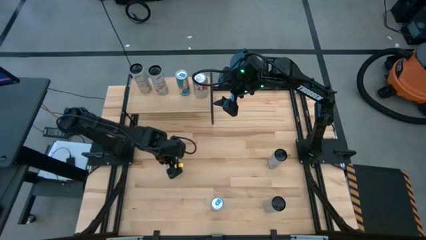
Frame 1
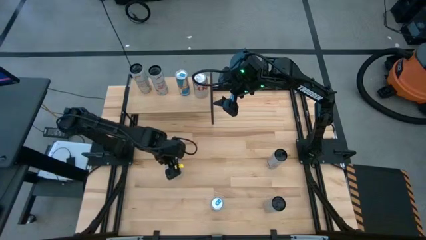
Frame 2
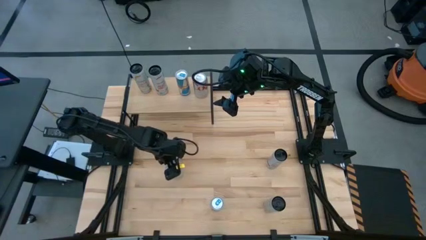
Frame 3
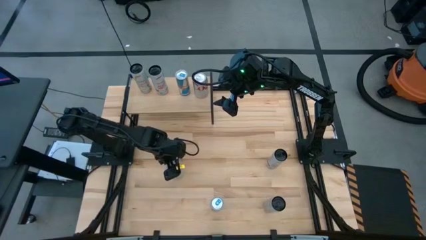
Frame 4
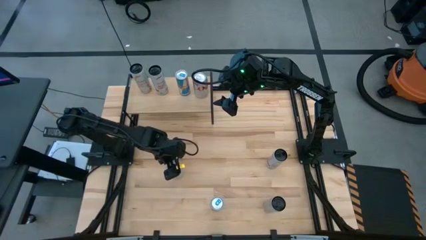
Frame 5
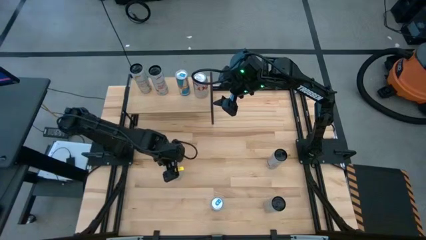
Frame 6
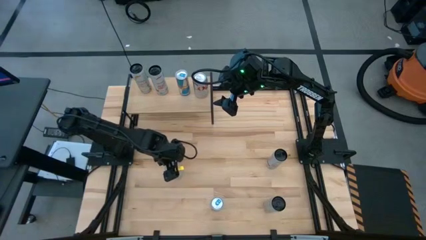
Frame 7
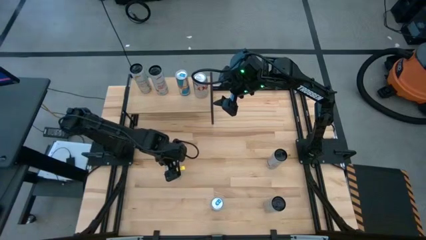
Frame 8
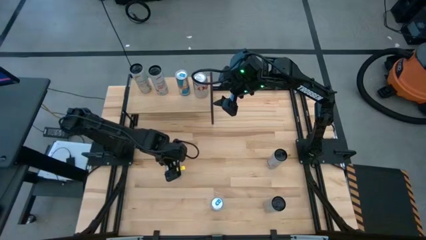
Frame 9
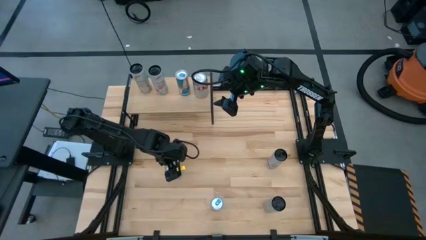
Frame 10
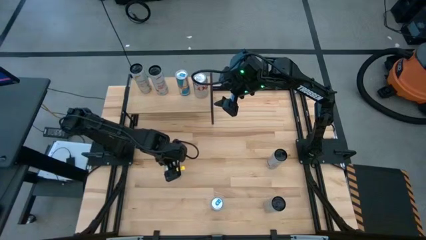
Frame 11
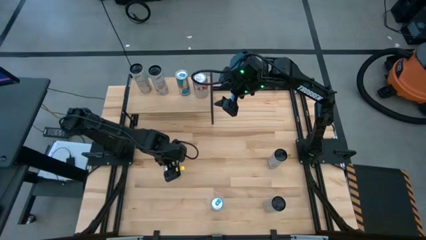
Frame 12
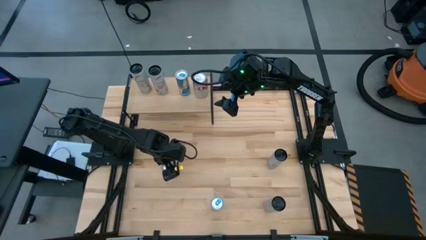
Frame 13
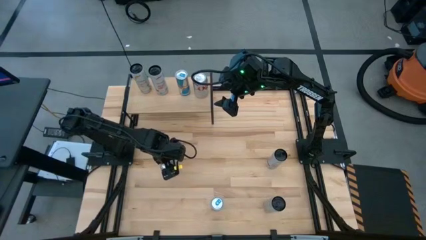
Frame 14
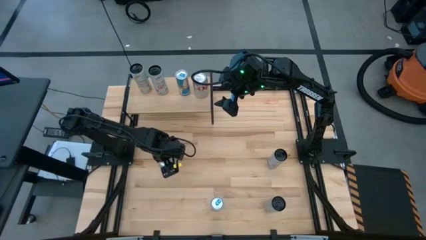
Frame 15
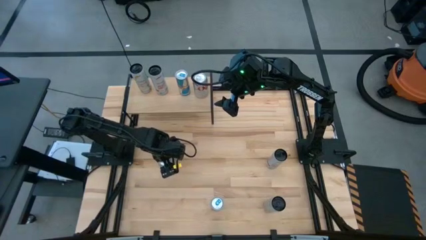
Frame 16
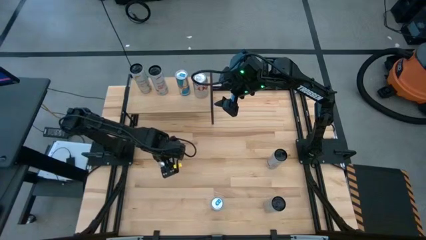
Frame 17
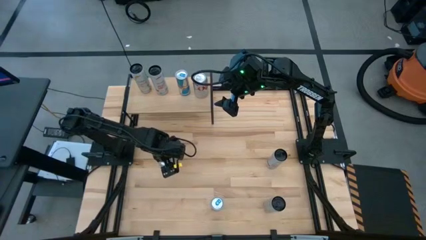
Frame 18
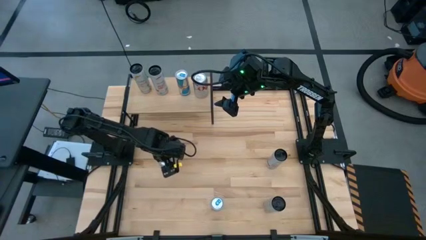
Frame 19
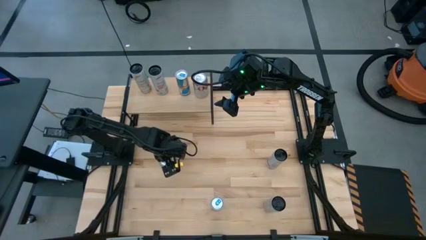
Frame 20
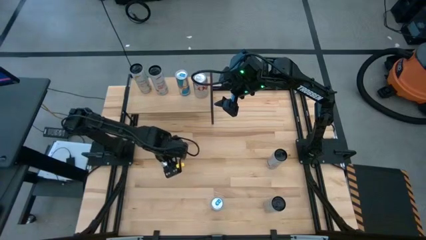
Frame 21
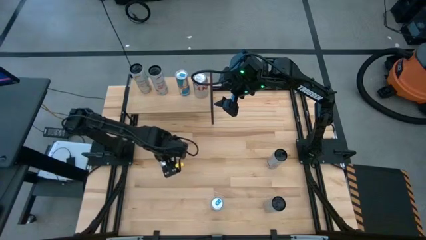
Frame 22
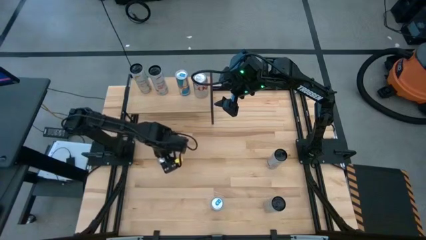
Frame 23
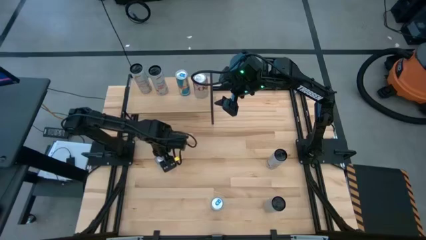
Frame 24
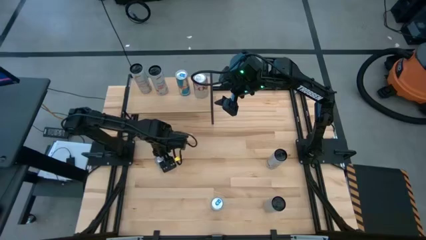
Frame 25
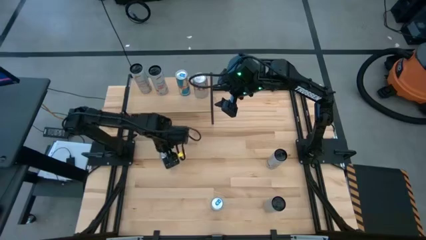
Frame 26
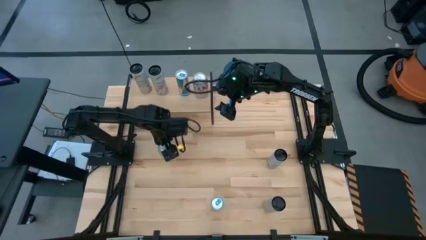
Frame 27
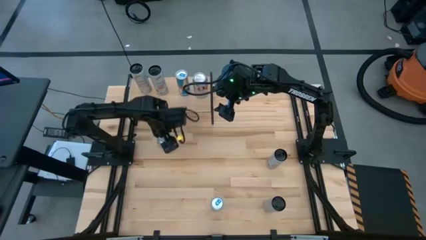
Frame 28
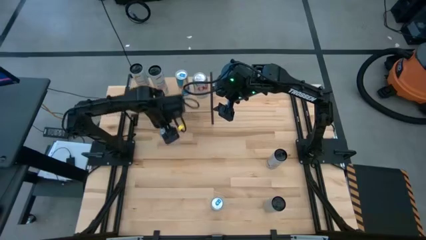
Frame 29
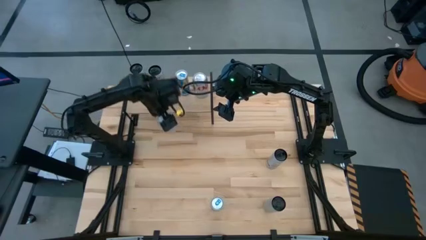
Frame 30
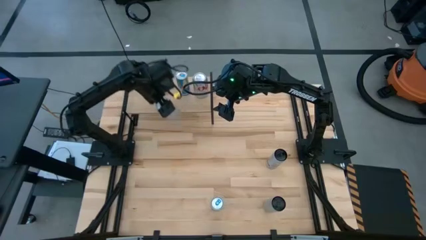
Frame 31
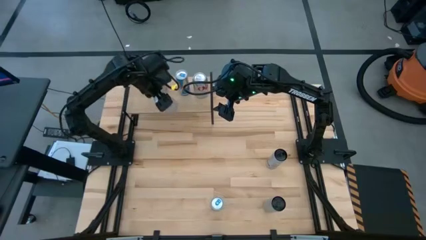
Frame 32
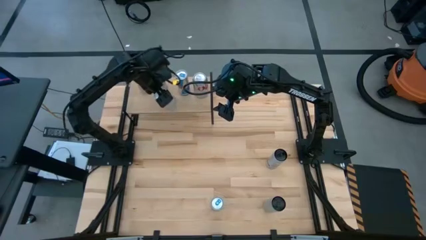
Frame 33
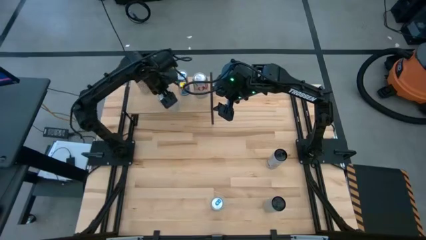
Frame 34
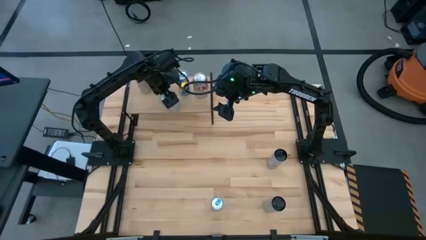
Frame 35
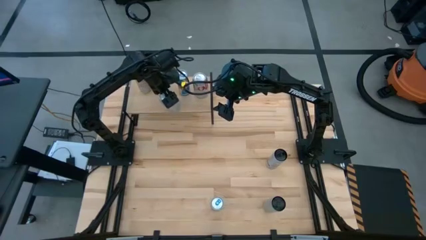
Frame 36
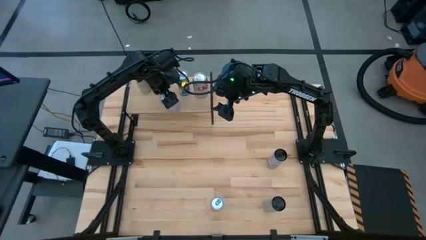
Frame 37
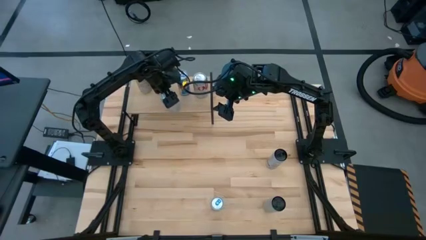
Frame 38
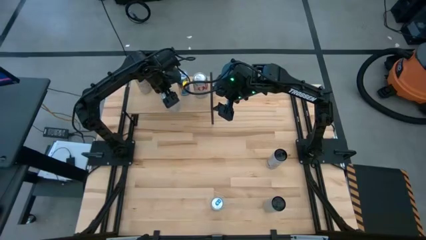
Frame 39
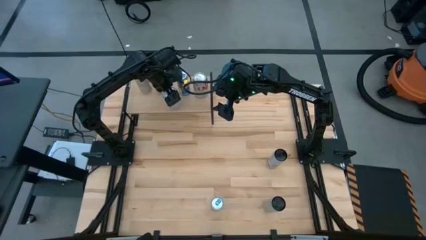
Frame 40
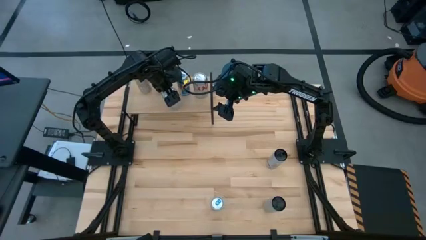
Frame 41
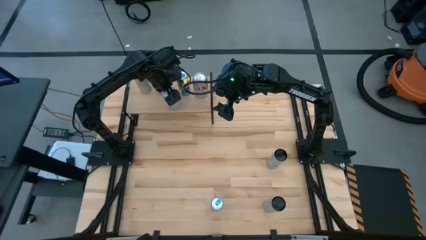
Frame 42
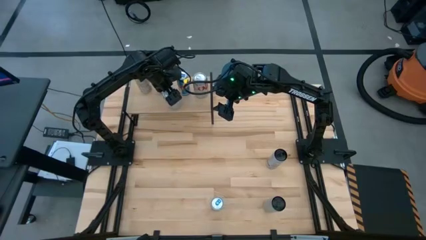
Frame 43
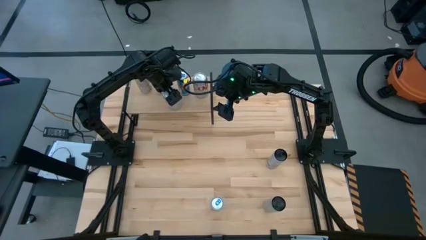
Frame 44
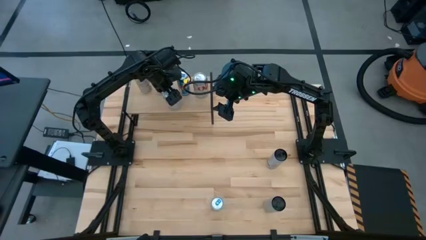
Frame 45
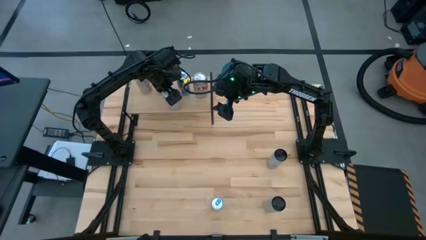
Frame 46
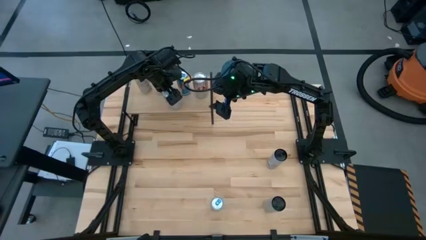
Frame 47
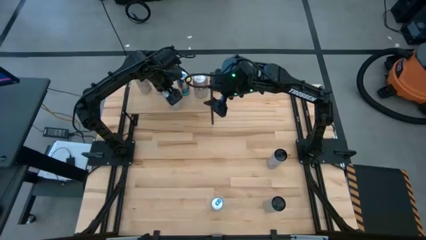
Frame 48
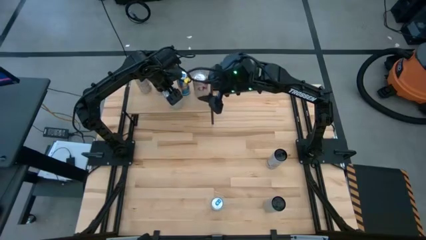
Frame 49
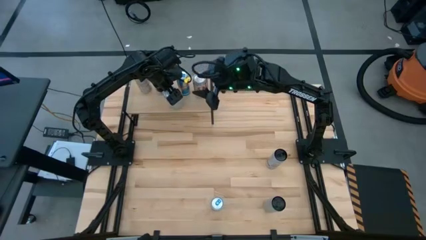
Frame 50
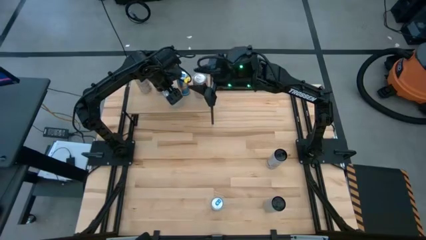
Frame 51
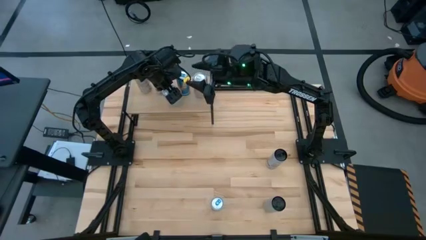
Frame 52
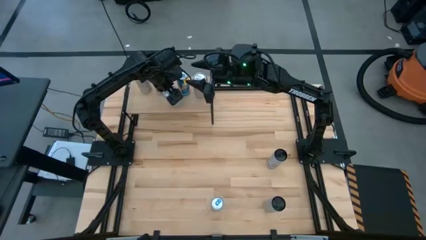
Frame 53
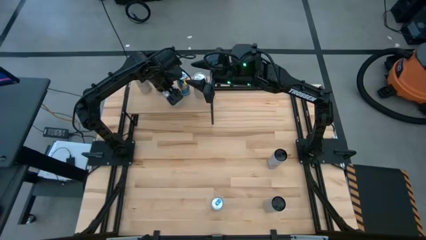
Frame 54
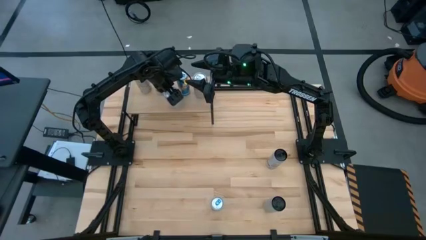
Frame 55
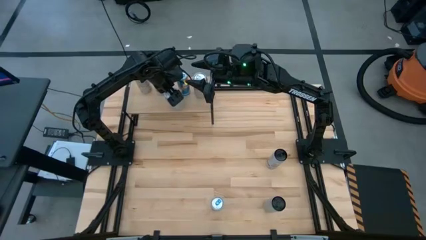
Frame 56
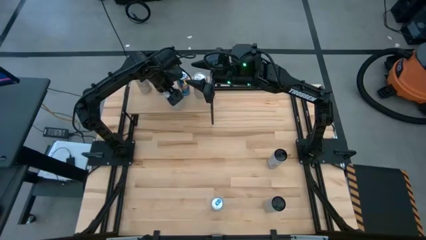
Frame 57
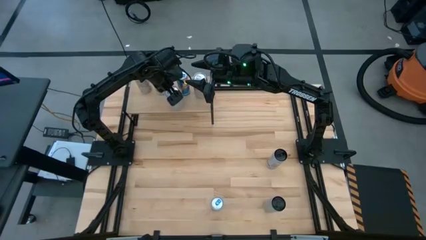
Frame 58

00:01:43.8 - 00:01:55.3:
Task: Place canned beverage on shelf
Put the red-silver soda can on the shelf aligned with the other red-silver soda can
